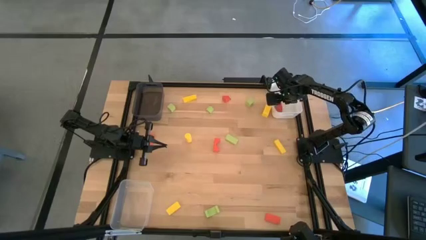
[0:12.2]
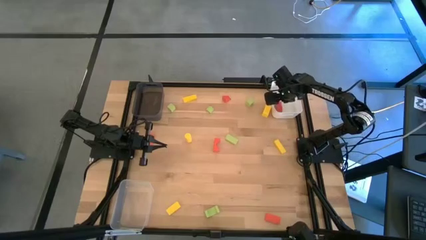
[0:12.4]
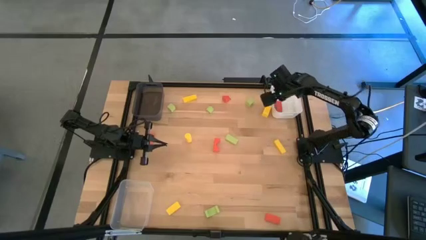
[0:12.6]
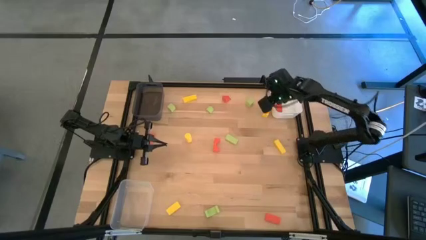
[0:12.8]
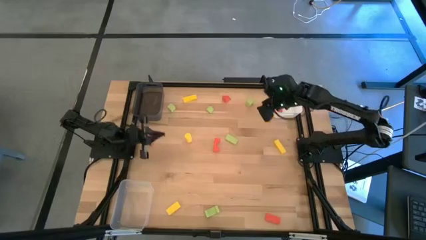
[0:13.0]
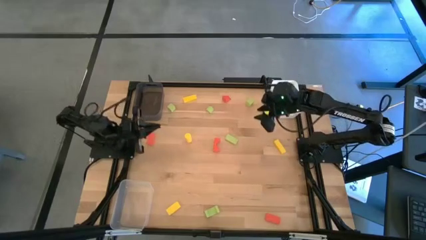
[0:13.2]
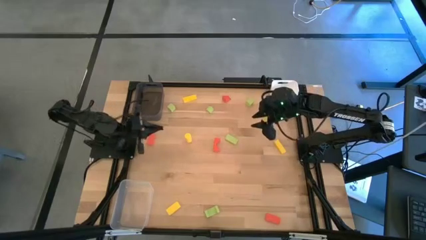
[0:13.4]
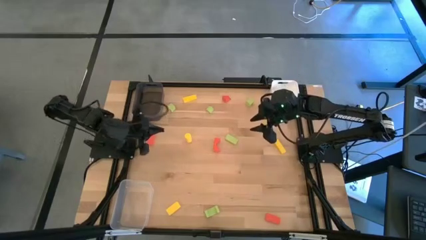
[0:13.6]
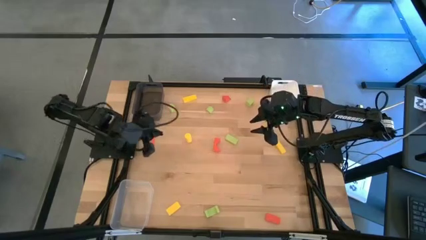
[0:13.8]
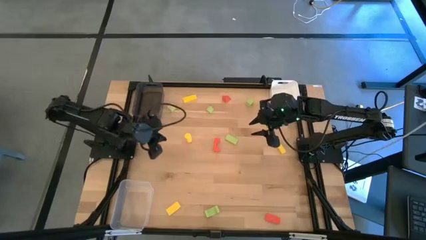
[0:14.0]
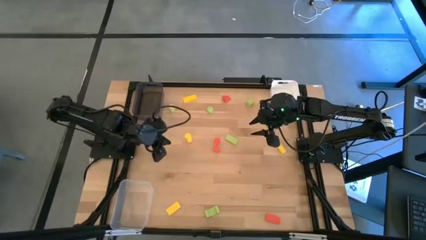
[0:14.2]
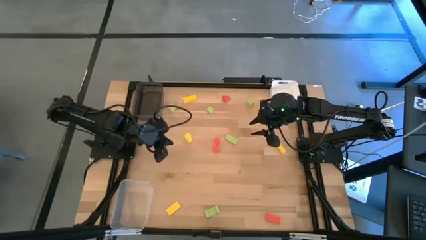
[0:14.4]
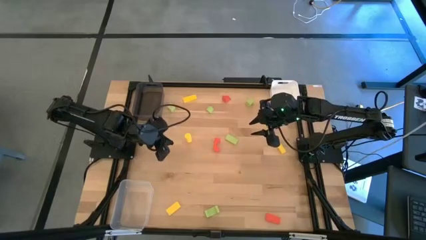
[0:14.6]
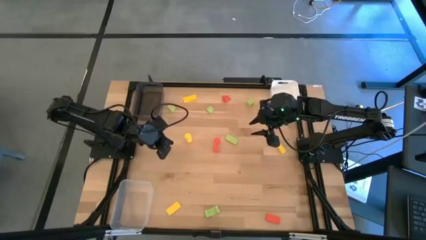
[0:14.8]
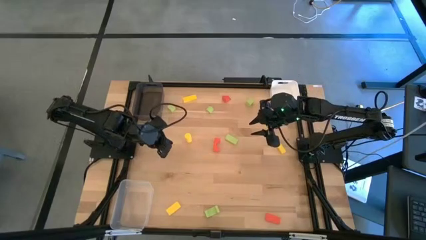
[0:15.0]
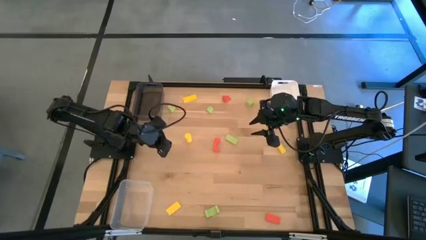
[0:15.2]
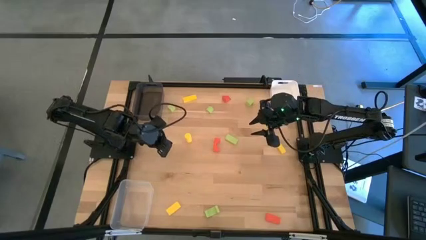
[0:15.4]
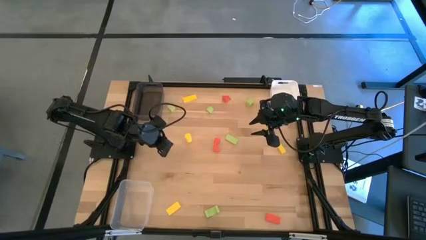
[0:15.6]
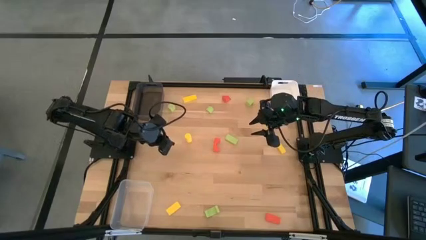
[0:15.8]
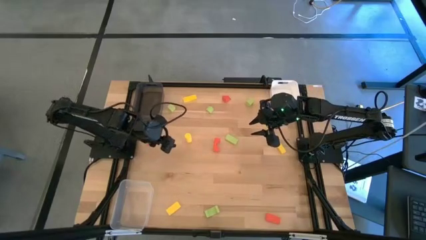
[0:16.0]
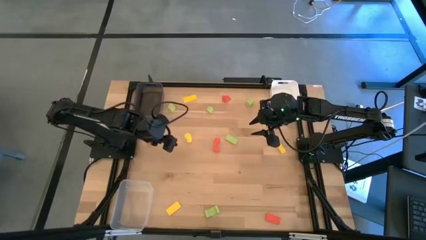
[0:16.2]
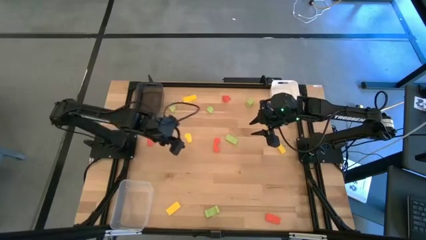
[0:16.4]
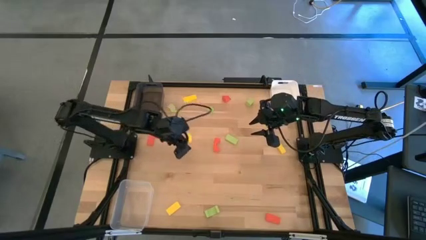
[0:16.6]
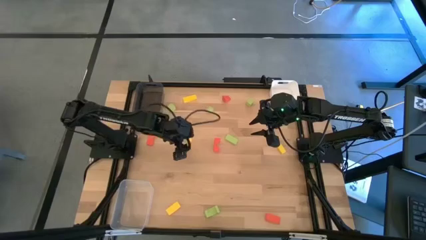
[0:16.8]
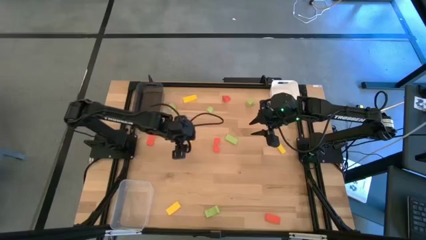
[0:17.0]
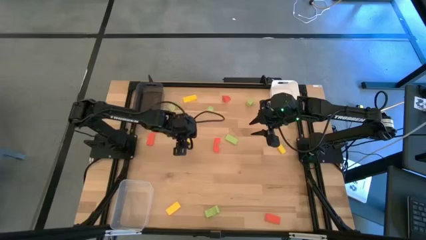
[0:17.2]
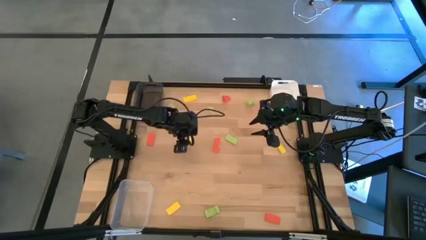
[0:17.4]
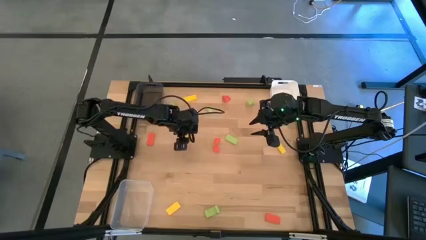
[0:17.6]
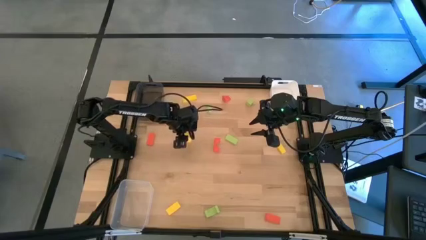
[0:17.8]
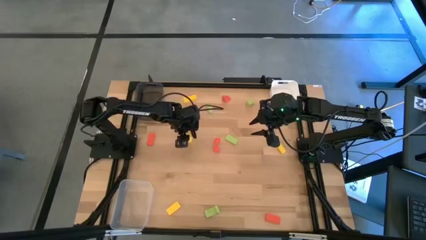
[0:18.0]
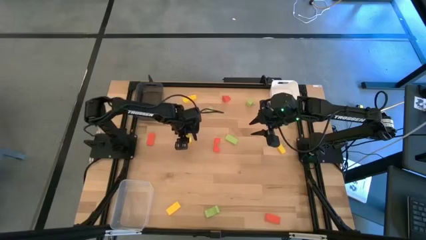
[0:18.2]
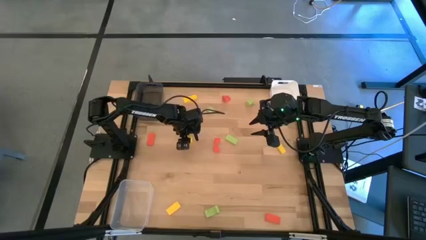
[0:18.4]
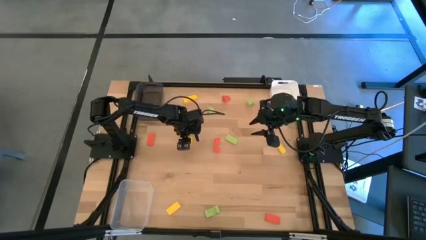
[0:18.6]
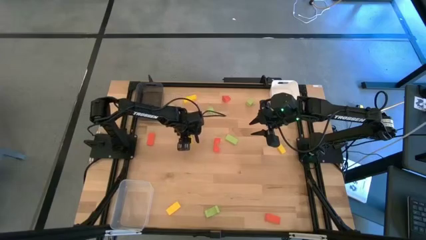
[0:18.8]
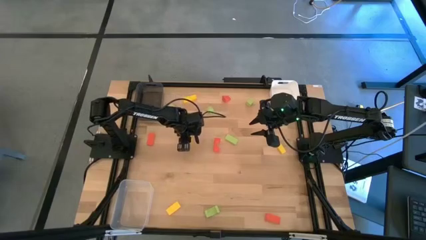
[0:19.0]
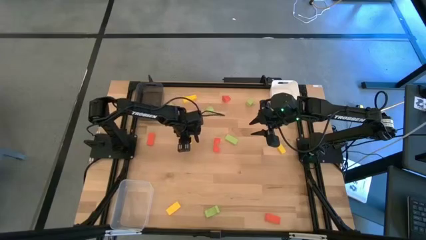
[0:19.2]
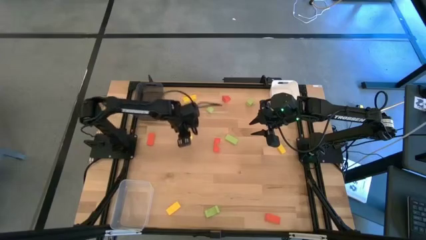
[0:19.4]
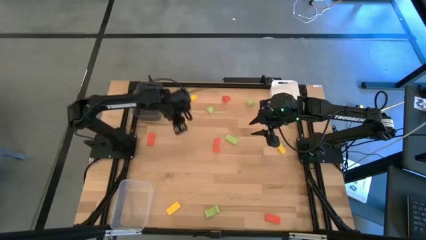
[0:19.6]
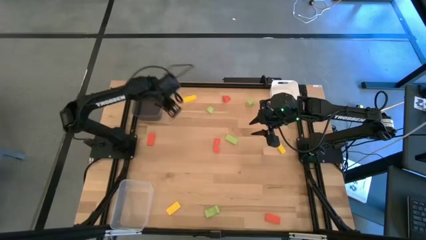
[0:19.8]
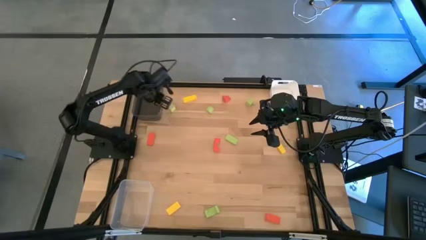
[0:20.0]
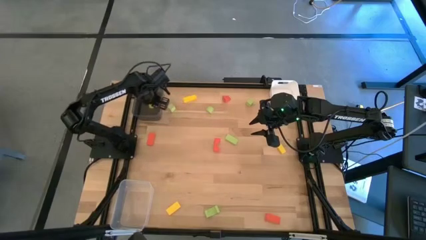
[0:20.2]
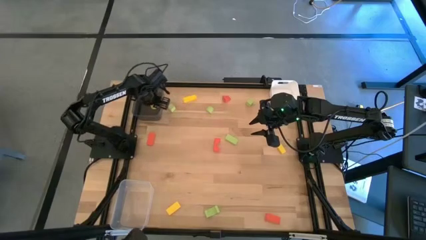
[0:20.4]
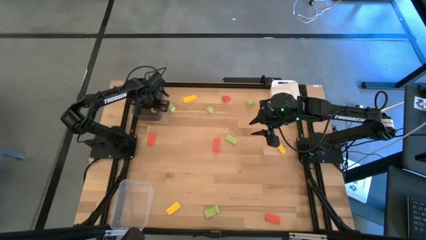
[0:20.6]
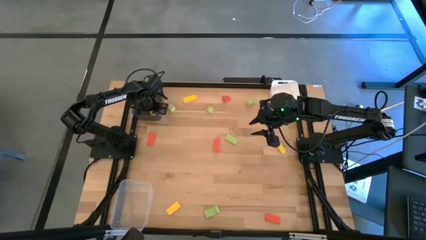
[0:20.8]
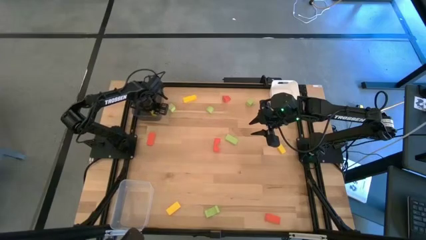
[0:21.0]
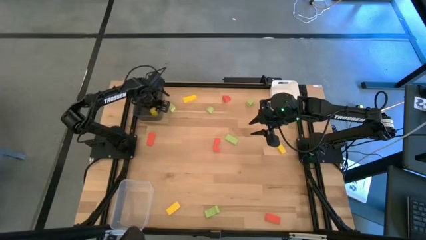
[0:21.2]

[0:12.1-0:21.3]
Task: Sort & place blocks by color
Put the yellow block into the black bin

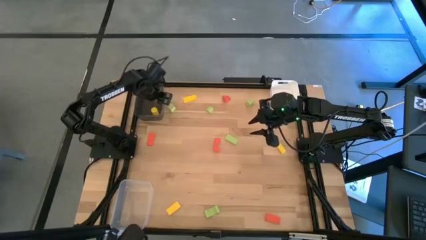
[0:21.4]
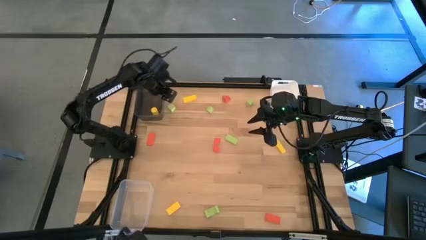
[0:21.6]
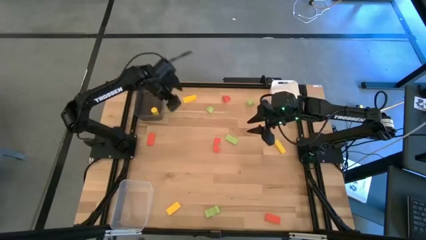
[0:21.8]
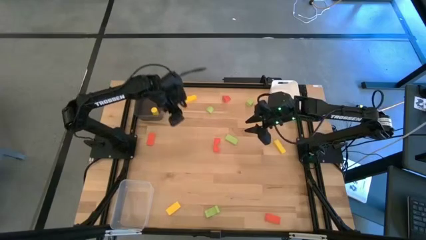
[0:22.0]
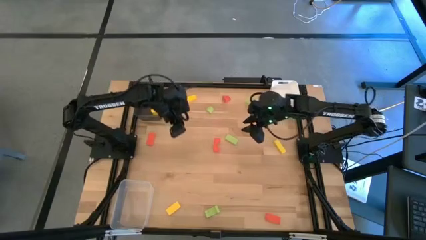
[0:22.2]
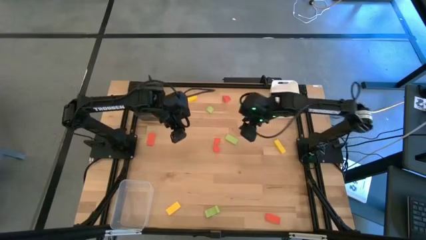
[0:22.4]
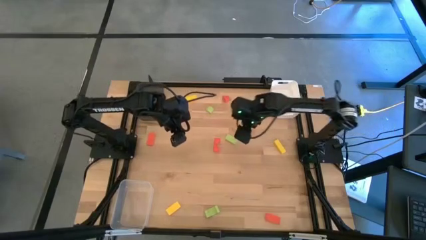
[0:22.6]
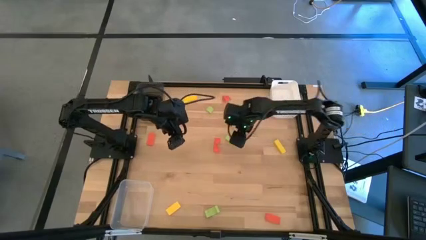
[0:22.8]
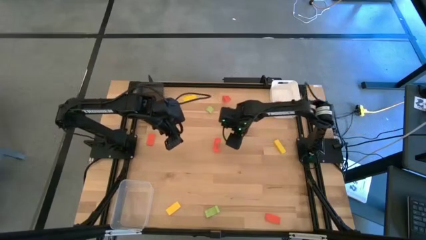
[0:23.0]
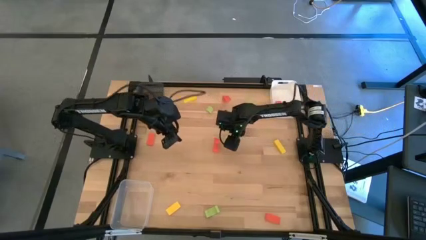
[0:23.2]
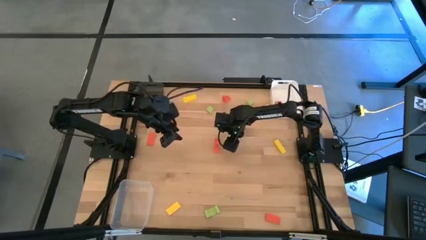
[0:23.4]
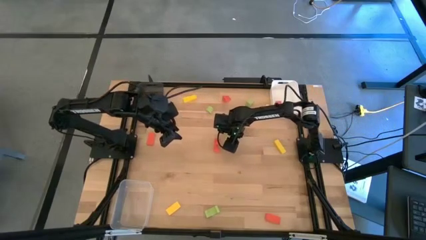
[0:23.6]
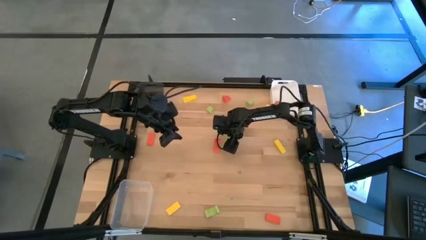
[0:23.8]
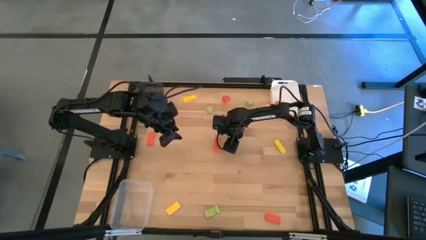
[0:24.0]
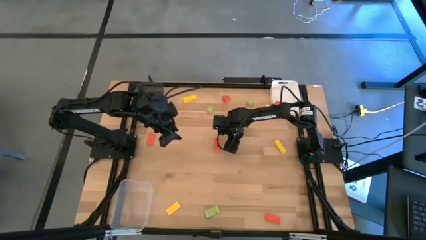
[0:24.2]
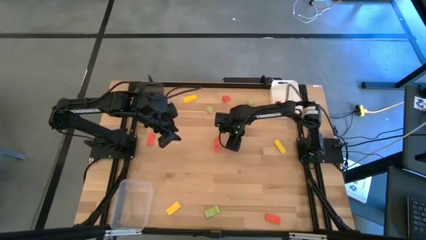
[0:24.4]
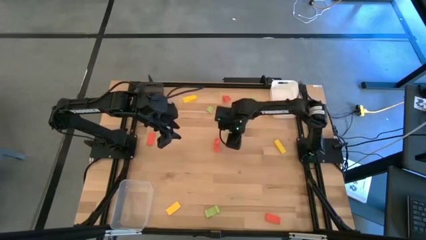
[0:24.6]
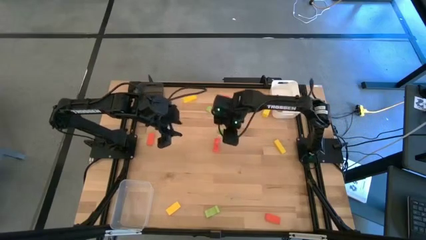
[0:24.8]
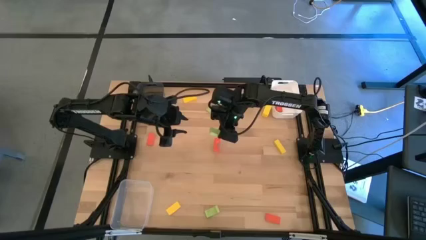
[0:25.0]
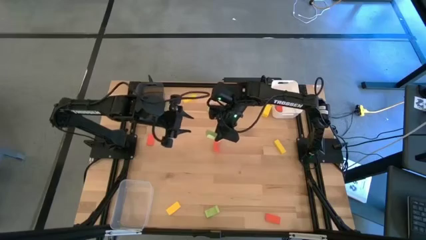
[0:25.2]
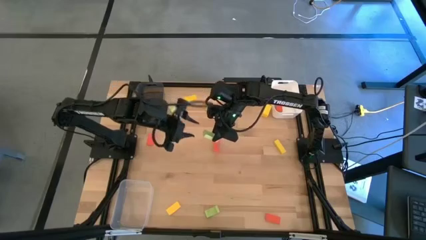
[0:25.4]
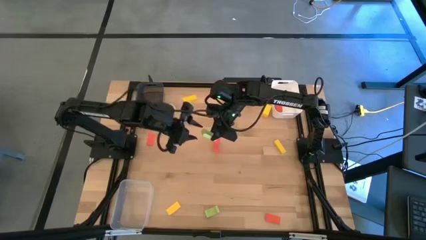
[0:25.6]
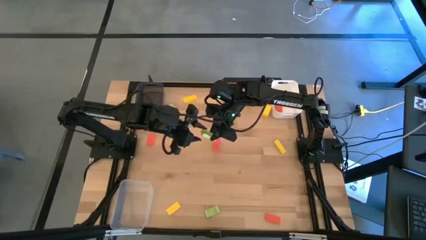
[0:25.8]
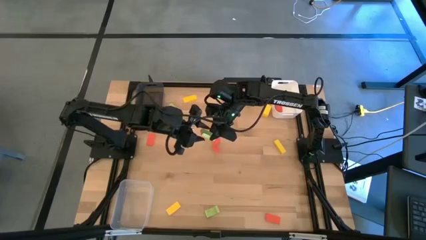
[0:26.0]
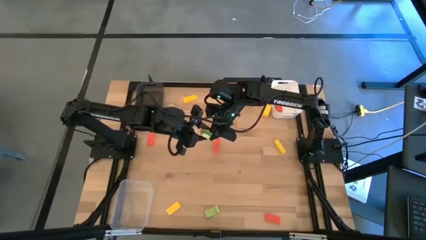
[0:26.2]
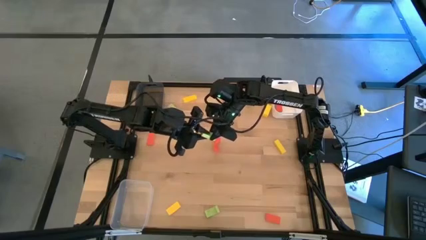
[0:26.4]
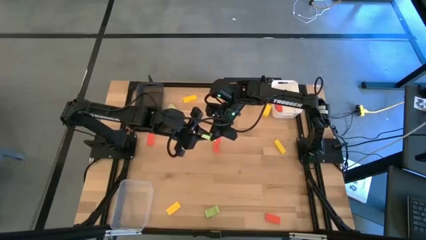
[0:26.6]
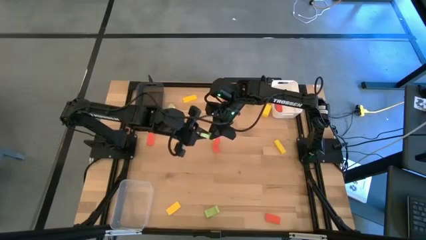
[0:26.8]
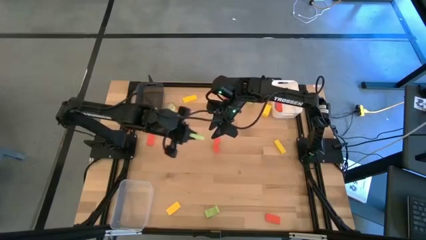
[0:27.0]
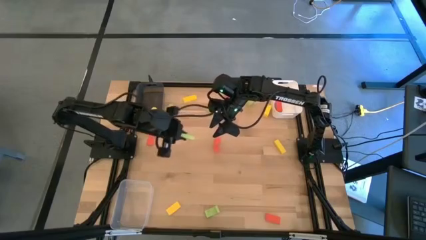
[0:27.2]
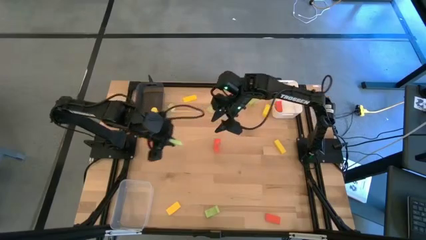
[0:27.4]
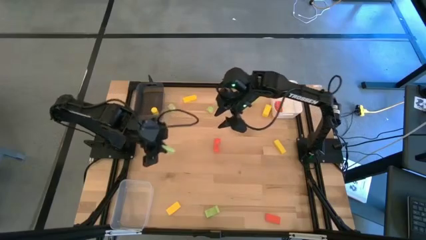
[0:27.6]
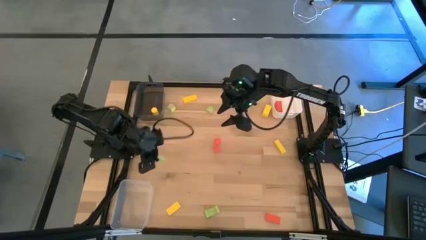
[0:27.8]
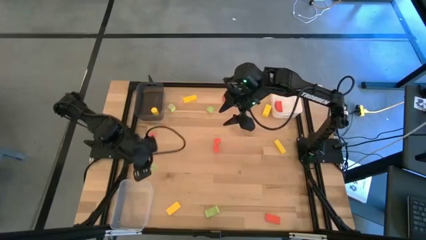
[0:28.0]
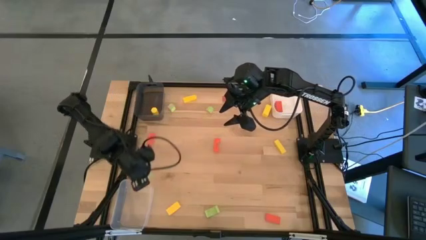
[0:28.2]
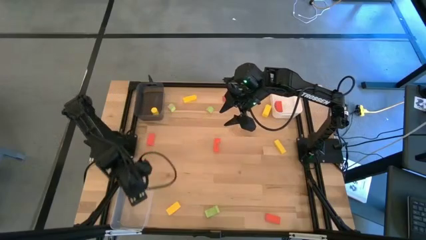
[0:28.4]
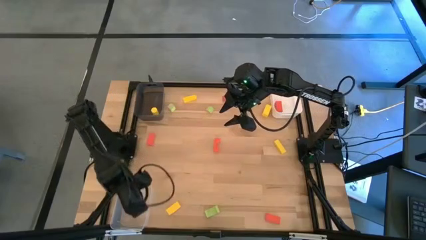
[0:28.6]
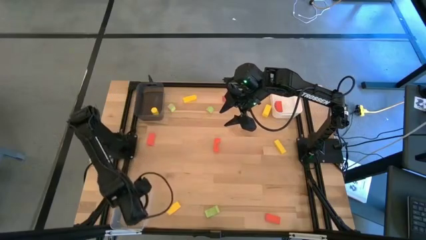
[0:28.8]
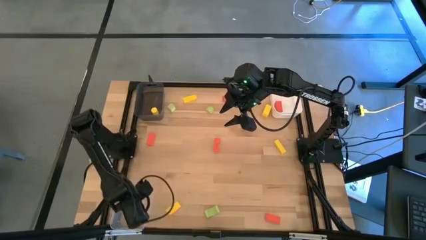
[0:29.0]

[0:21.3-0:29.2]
Put the green block into the transparent bin
